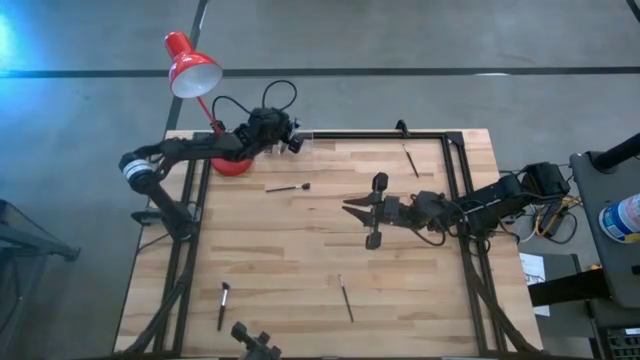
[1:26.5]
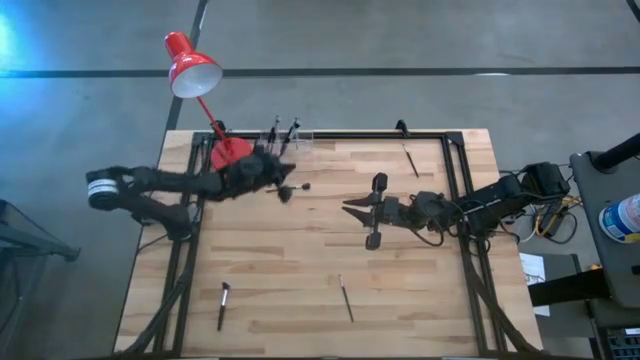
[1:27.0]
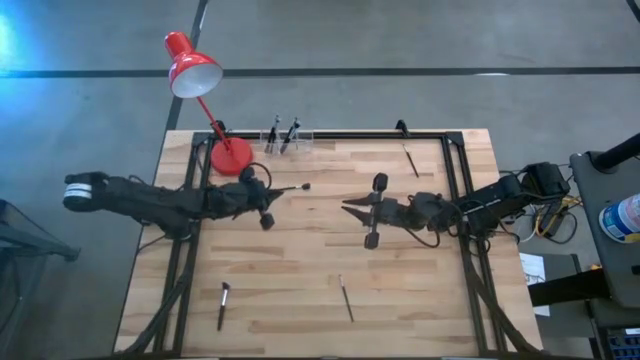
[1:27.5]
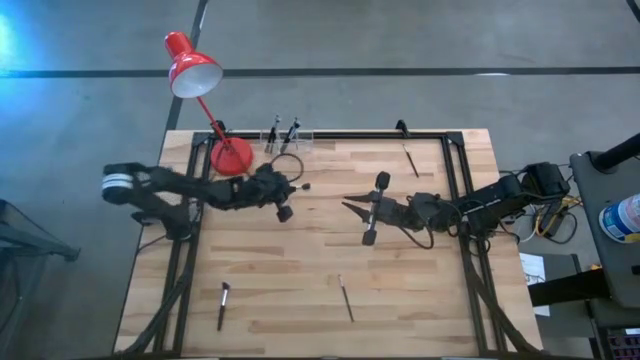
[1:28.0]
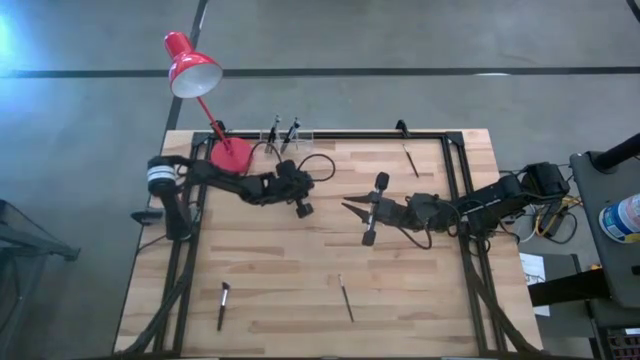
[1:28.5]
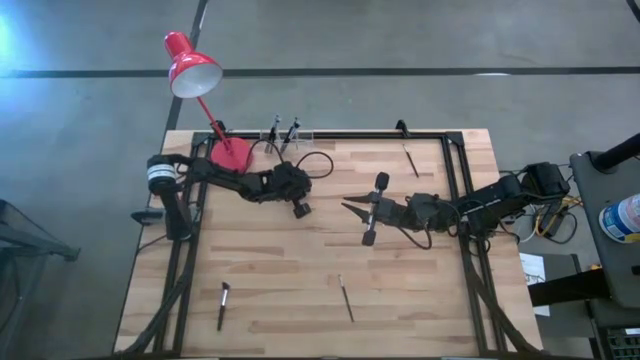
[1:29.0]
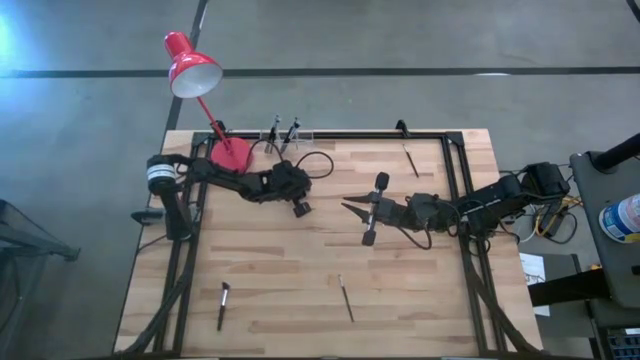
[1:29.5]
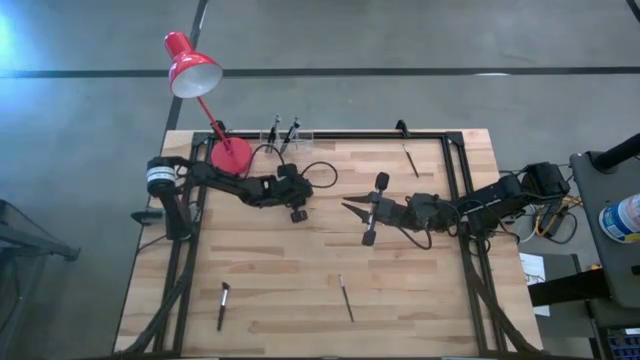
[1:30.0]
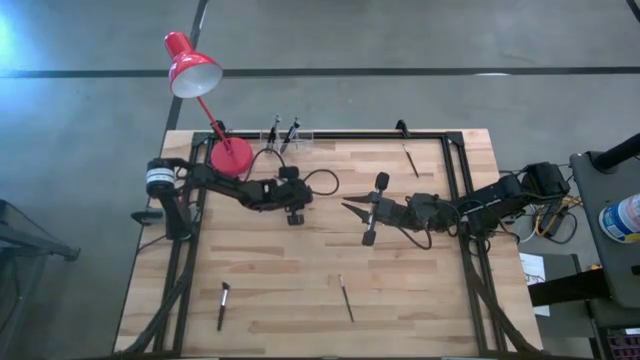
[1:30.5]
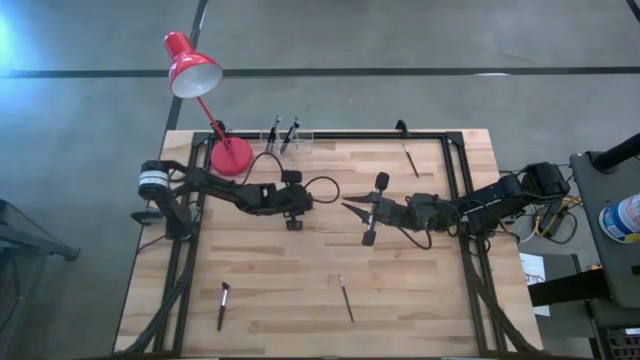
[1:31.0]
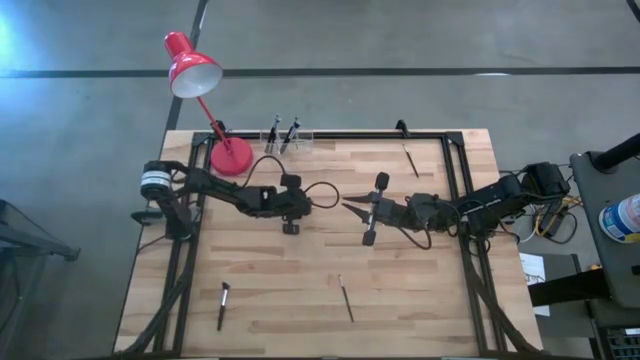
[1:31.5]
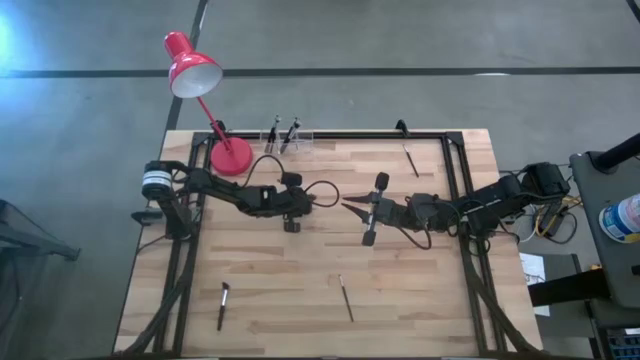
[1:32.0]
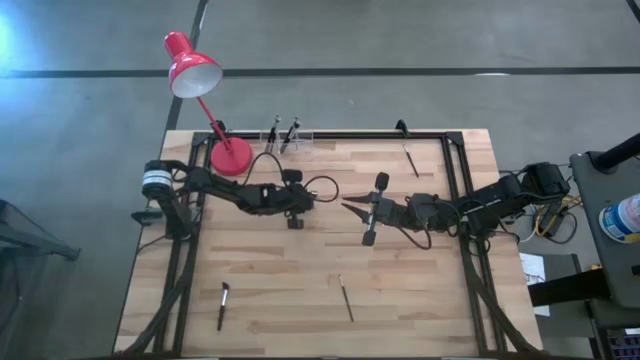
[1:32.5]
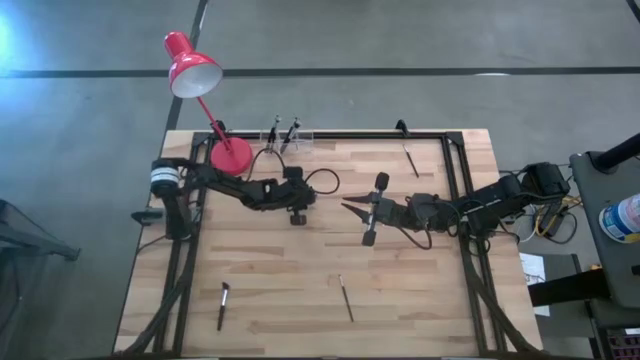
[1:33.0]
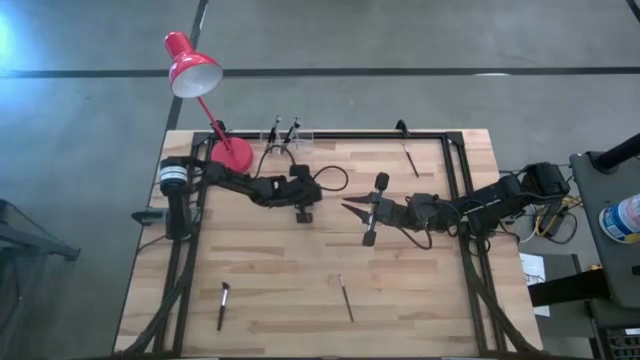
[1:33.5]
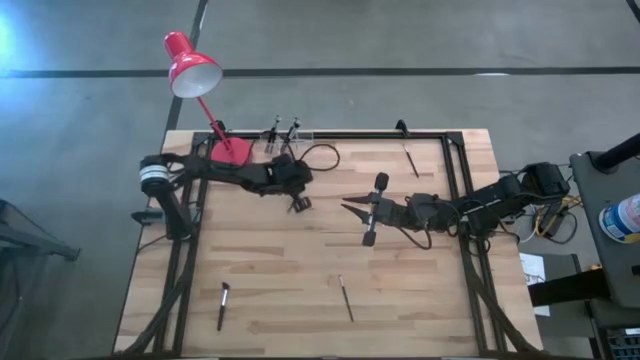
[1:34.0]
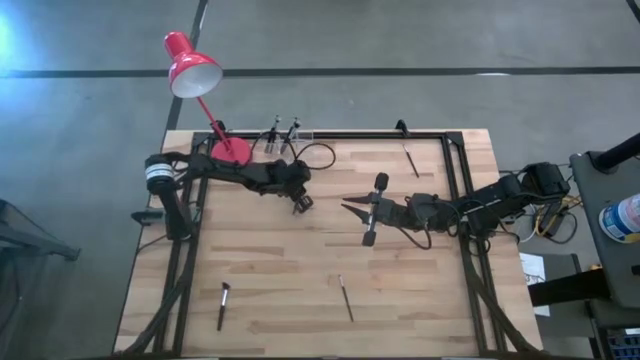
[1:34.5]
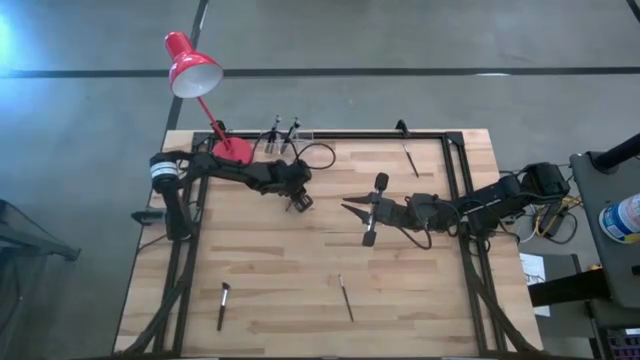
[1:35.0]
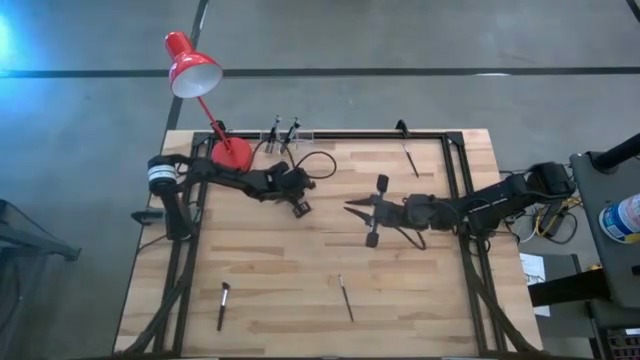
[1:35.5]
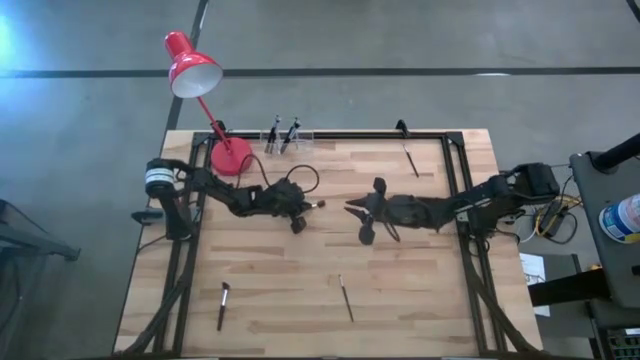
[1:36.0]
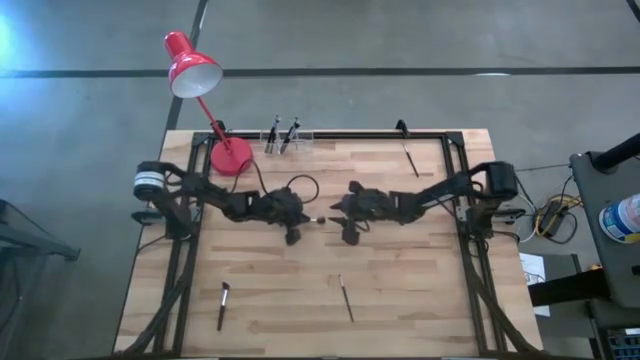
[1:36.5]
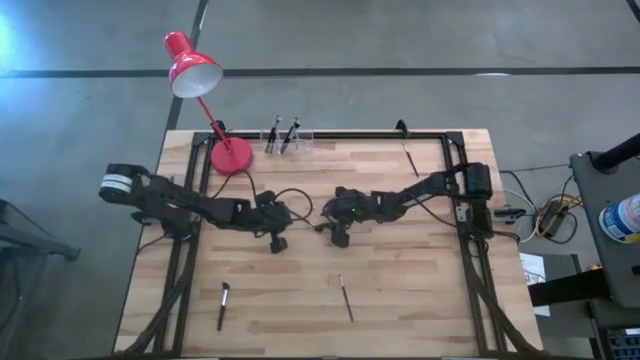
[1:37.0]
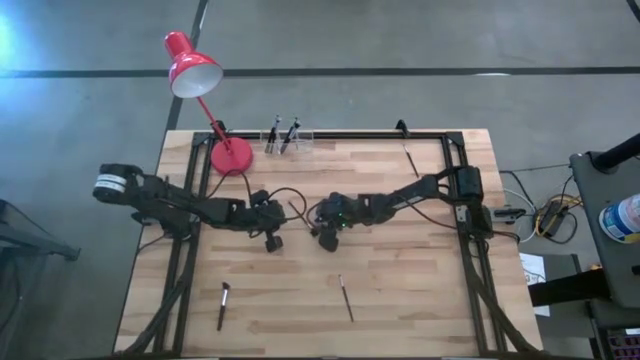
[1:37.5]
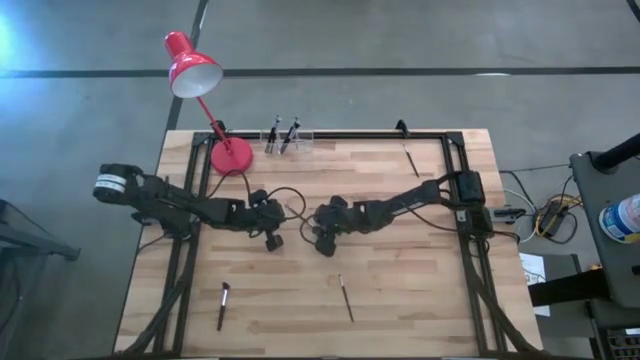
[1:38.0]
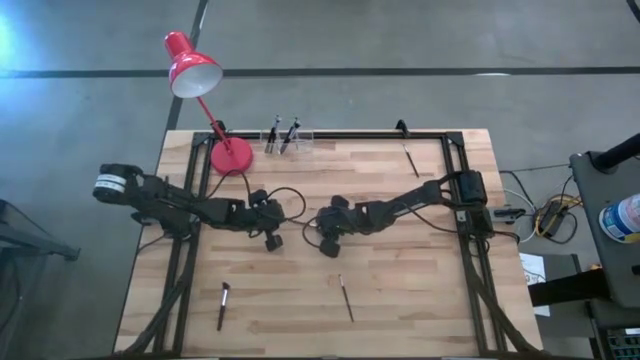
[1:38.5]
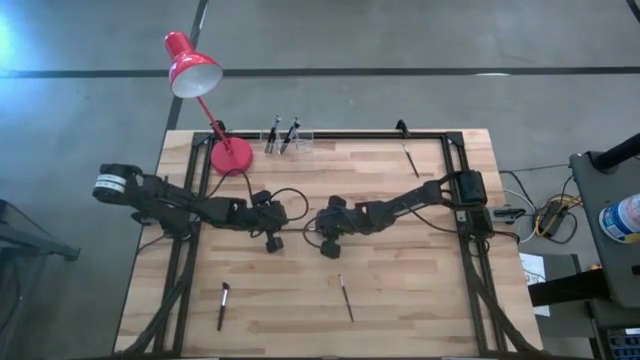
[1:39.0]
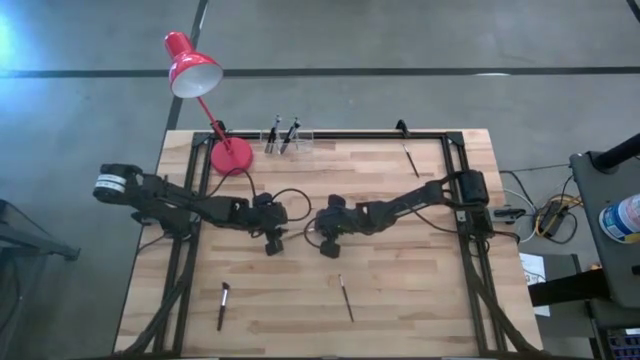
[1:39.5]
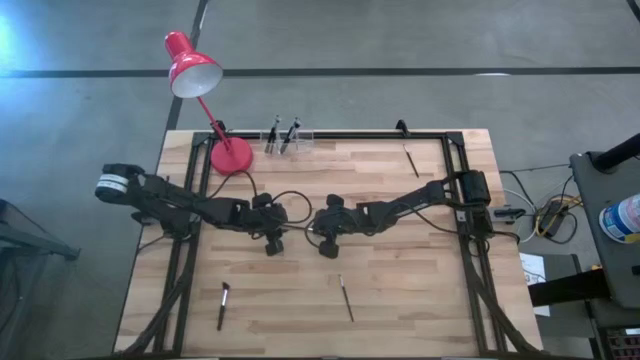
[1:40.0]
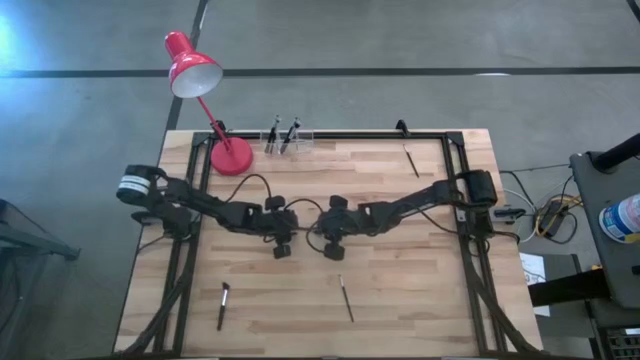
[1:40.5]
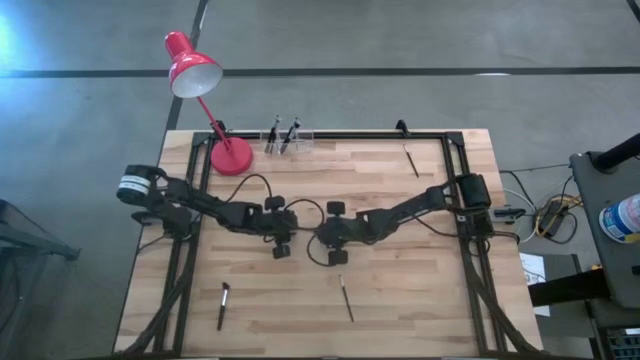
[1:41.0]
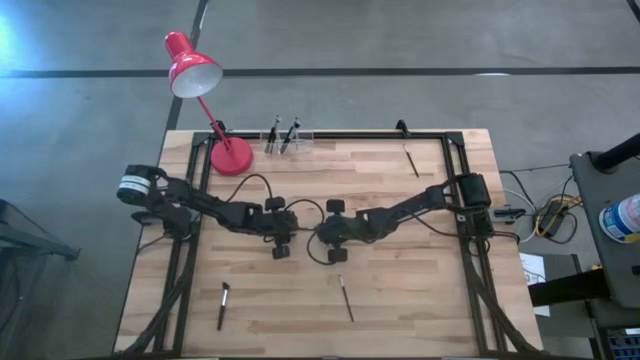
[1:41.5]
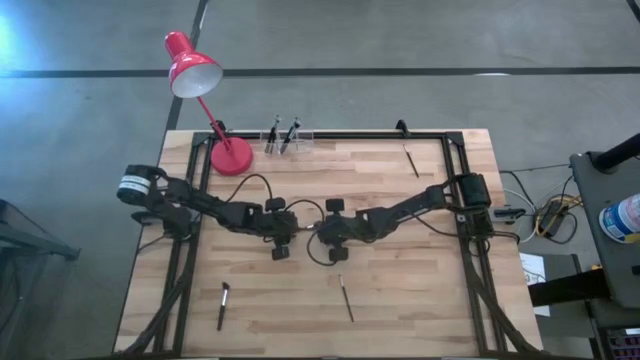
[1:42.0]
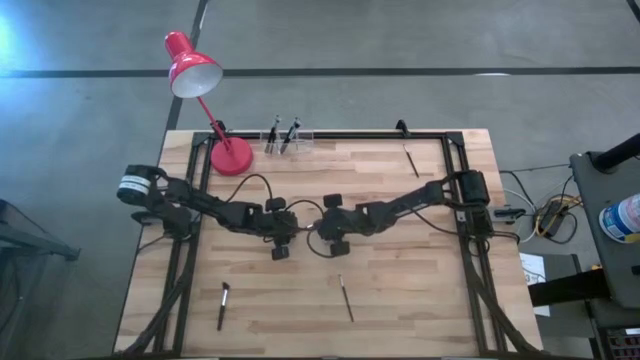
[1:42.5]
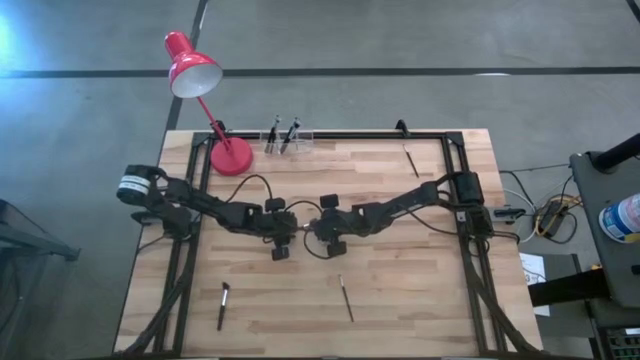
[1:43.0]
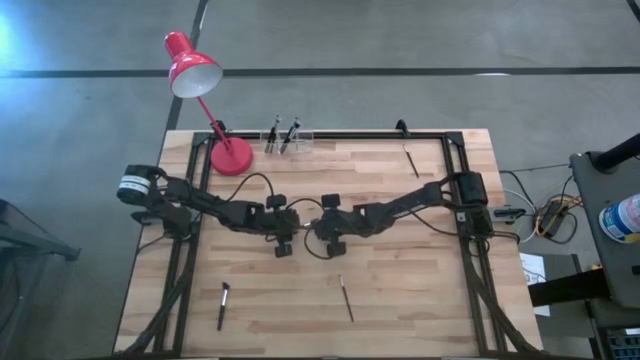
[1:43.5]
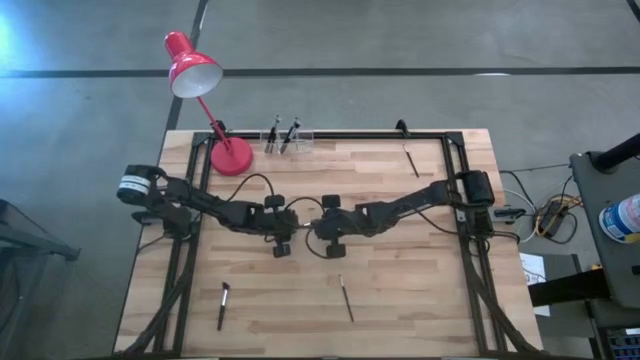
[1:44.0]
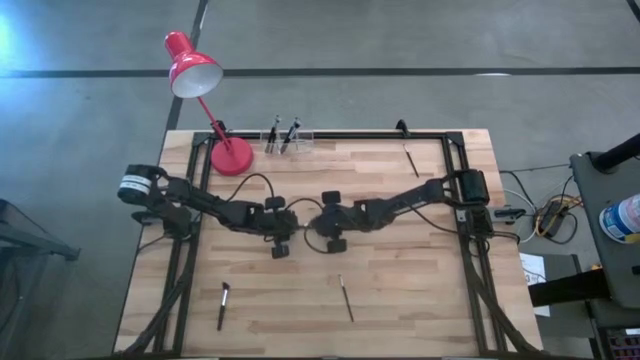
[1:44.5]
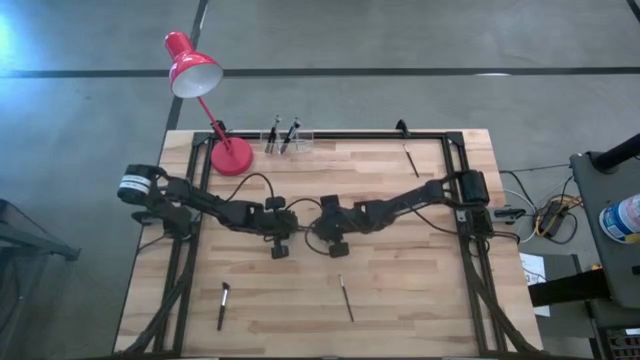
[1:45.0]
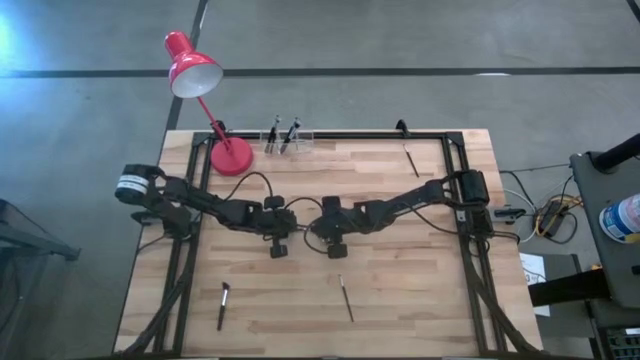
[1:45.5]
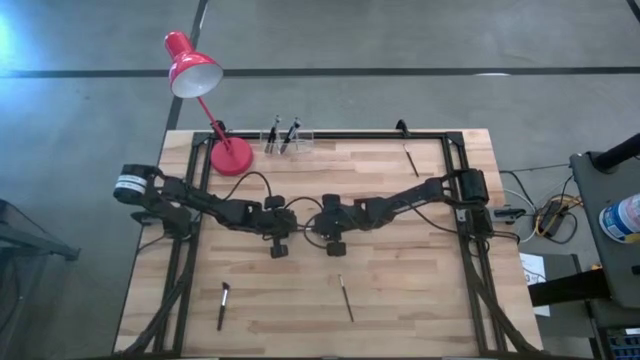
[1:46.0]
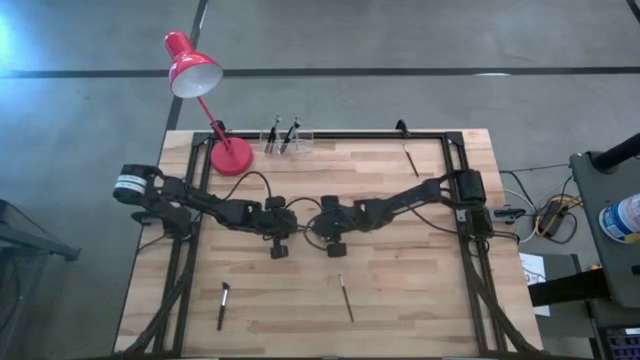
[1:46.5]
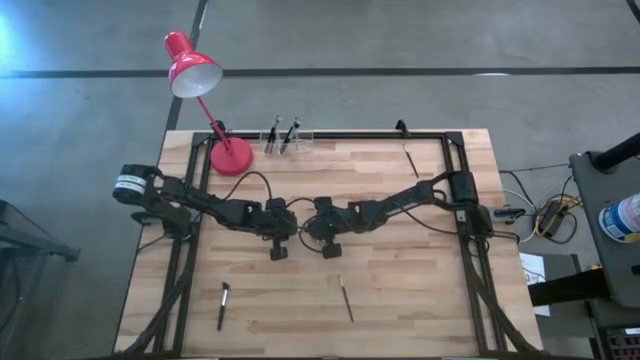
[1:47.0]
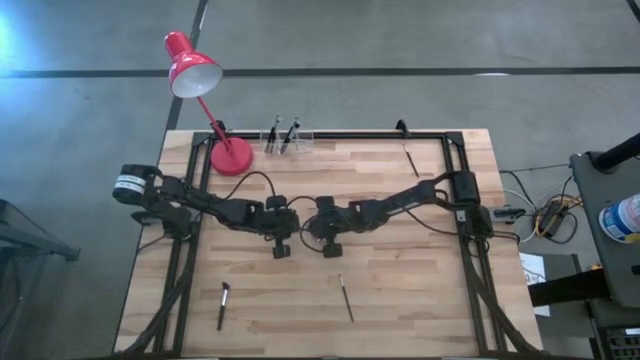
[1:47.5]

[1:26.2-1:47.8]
Task: Pick & Place Makeup Supplies
Put the makeup brush into the transparent organizer
